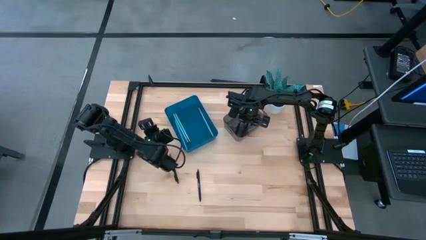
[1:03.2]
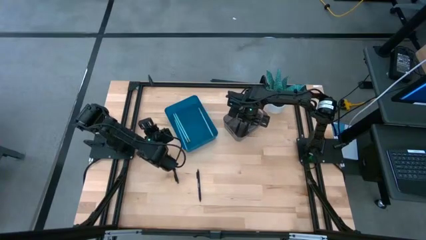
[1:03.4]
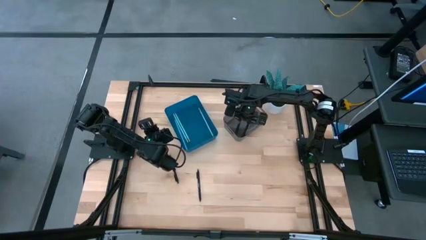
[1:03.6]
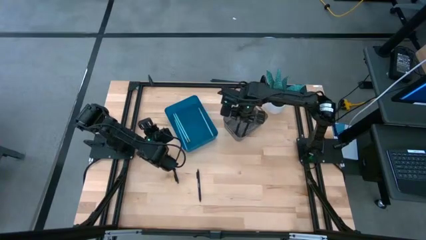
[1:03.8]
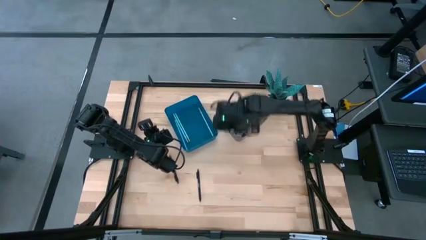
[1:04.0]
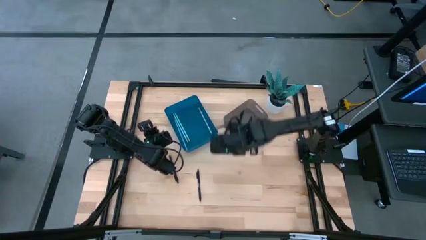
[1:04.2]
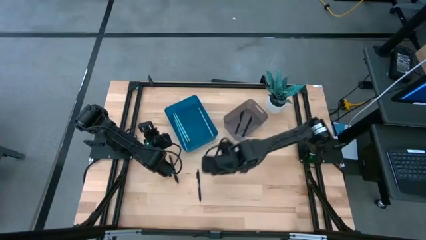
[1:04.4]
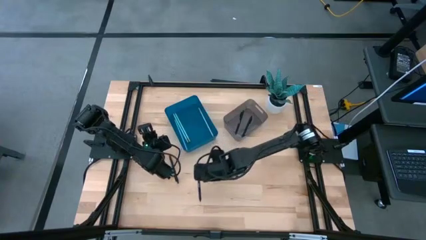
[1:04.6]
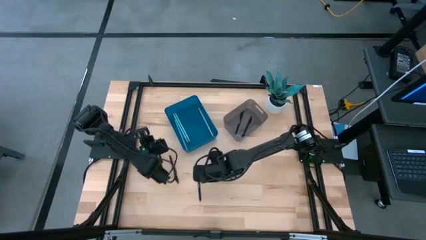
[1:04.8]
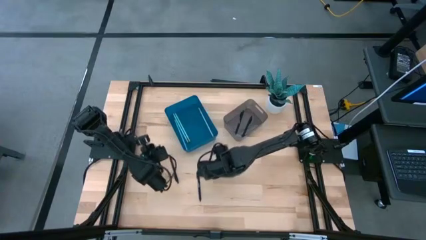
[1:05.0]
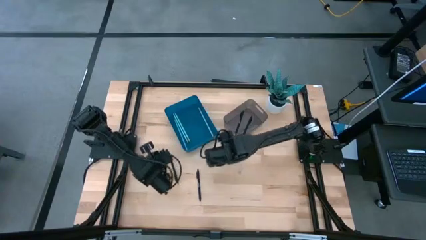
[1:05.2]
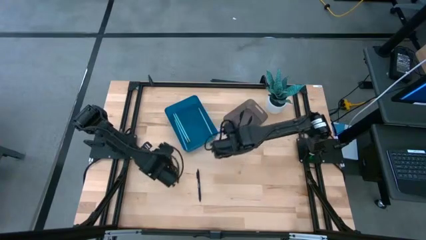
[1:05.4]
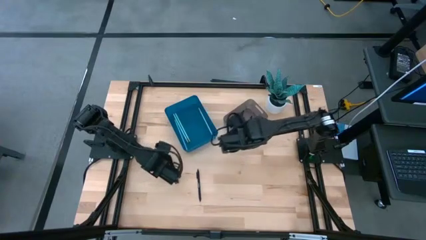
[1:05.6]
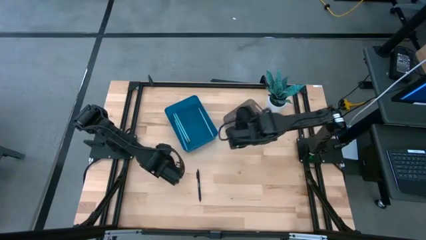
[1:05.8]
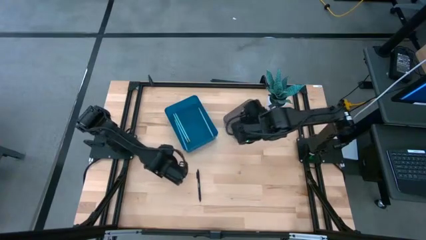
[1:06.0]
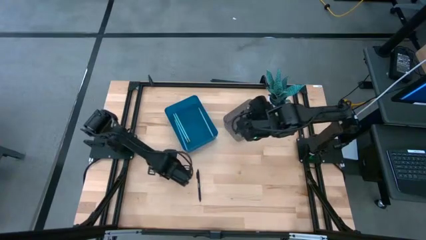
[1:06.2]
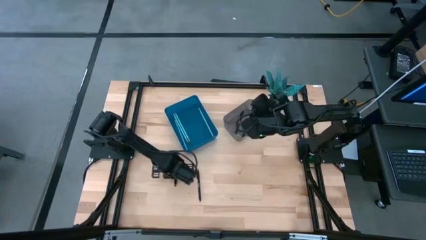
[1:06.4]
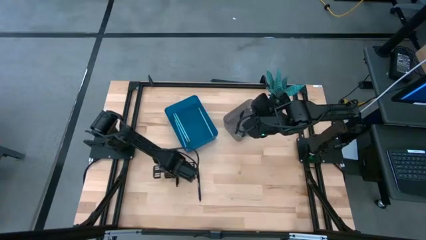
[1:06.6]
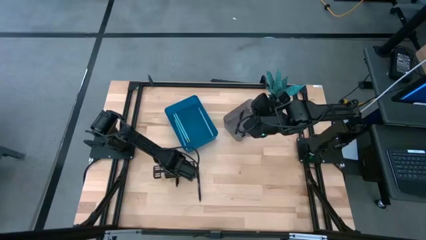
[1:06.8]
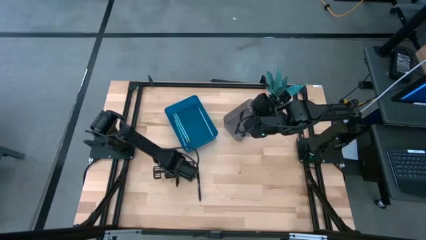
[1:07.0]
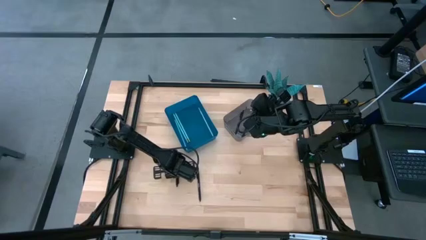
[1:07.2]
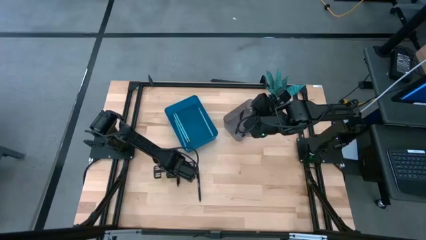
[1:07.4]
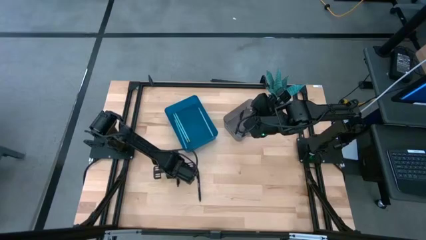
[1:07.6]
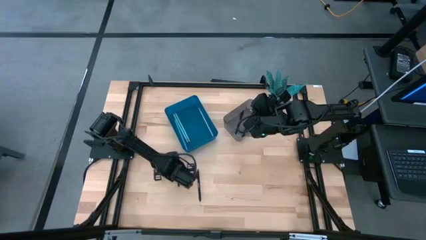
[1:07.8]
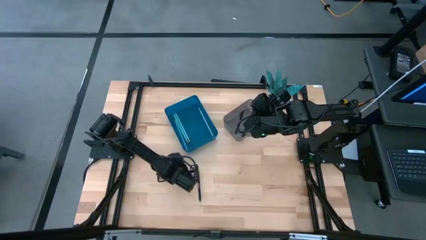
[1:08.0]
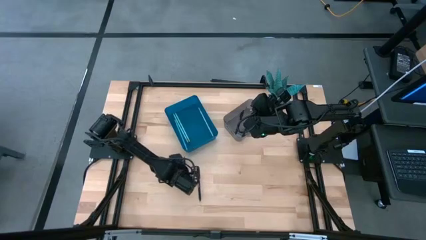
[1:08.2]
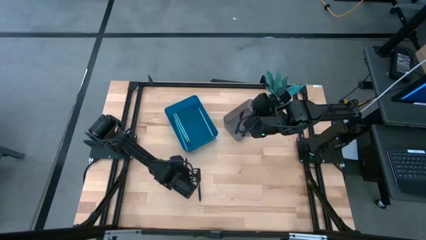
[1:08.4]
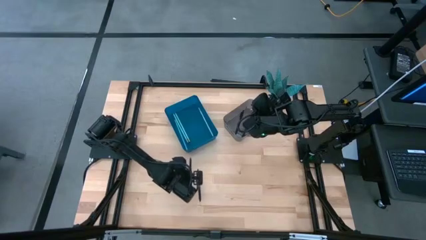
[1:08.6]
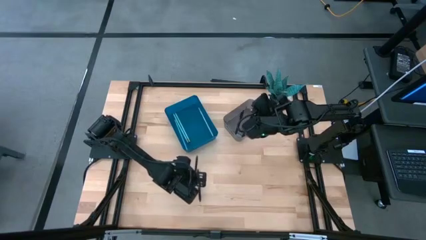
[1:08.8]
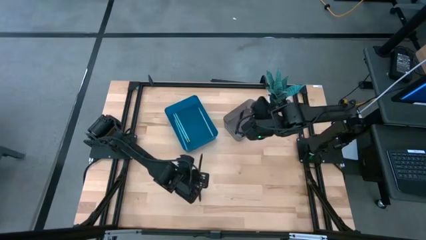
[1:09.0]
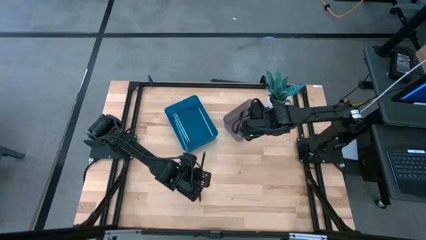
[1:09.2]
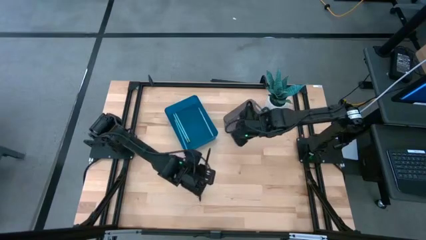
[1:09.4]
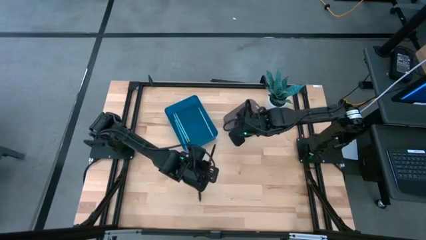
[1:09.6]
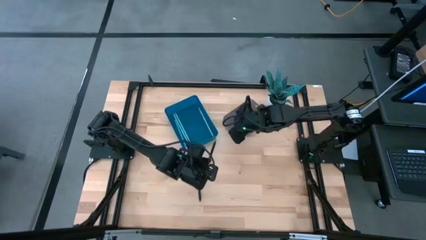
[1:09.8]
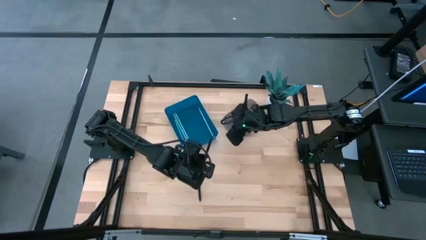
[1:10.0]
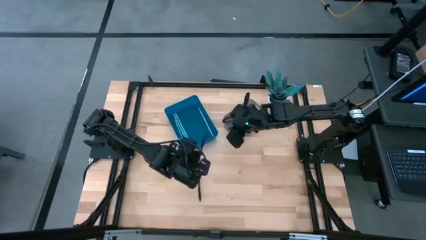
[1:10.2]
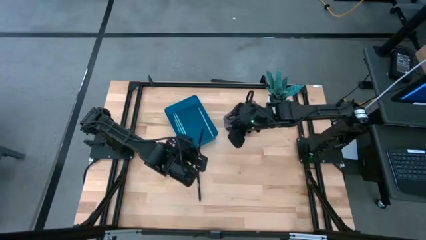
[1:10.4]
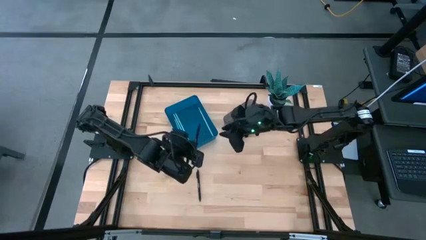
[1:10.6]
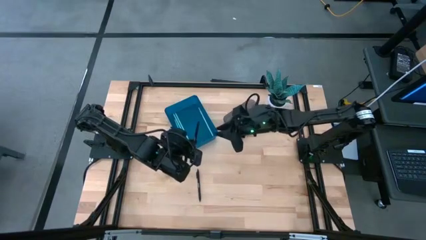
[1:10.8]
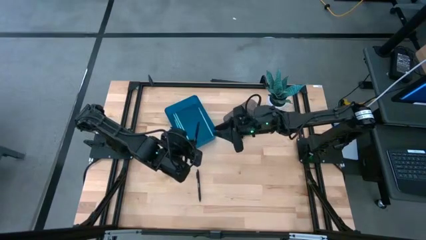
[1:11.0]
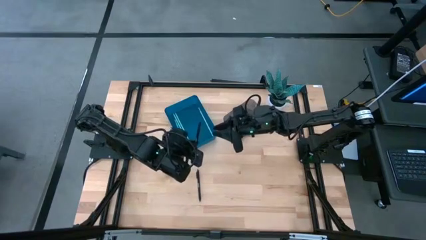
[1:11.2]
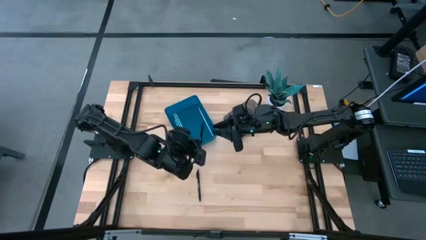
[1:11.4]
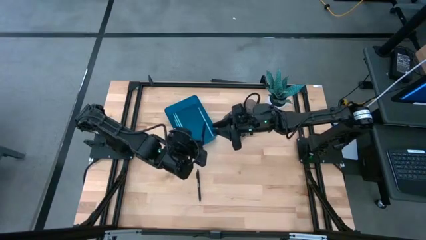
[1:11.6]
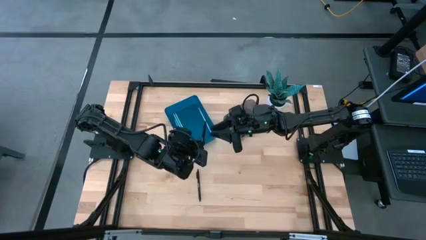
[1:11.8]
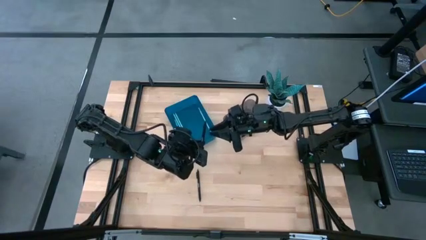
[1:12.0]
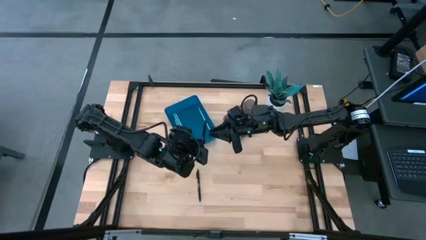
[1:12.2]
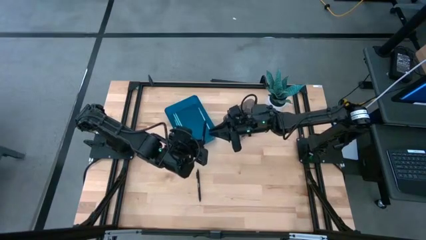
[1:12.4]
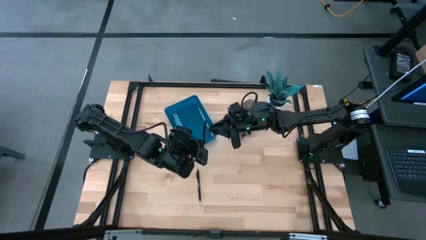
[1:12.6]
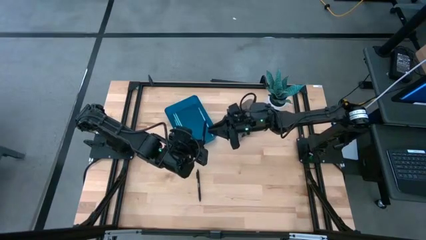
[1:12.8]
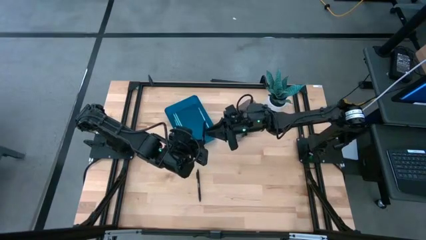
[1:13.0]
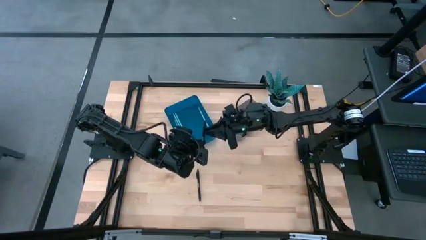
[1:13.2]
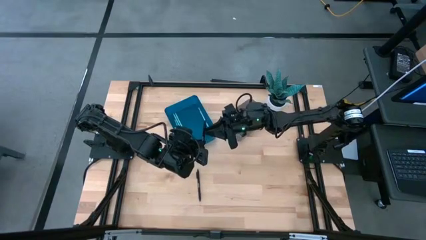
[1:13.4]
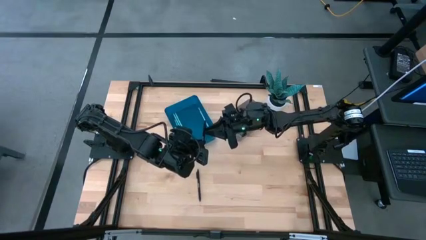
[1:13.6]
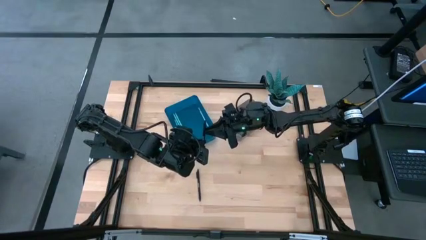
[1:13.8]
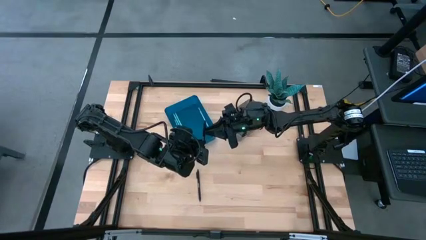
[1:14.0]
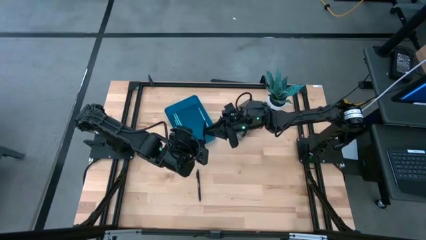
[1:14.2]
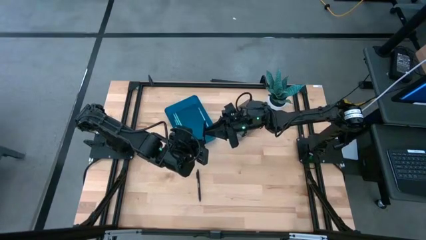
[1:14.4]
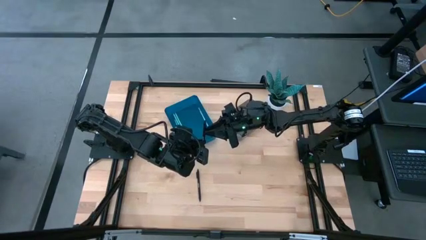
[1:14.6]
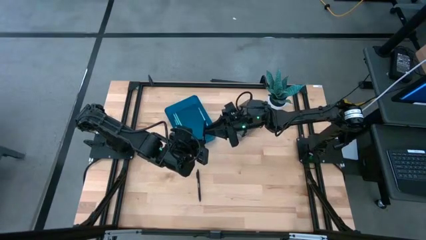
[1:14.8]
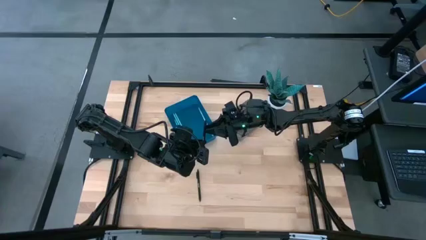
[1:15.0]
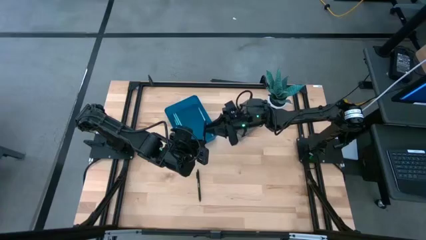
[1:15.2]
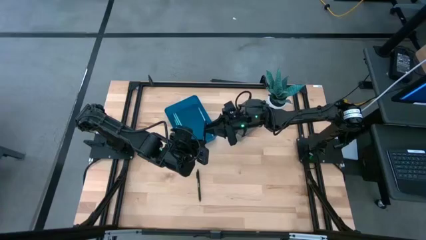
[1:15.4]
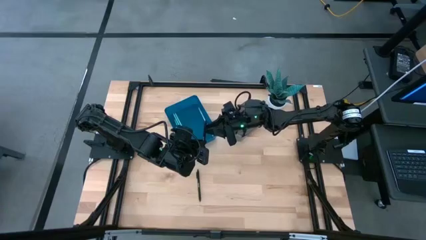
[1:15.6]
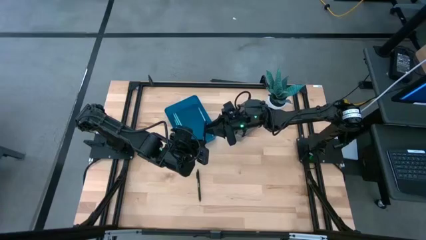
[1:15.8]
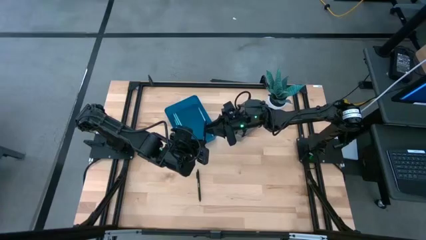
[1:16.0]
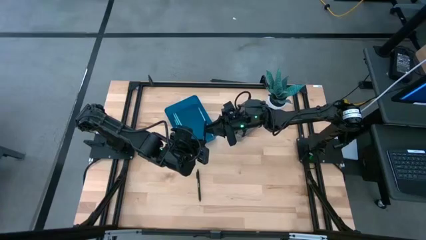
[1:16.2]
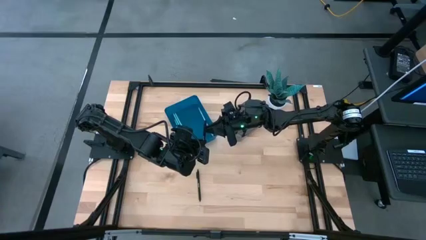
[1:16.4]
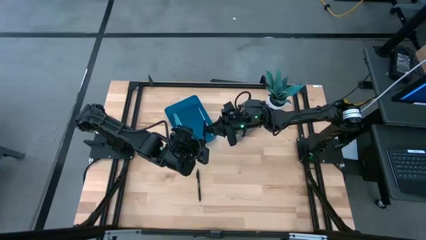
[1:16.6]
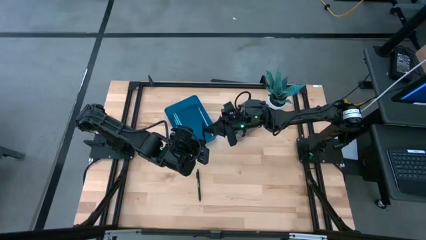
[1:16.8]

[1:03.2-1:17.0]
Task: Sort pens & pencils
Put the left black pen into the gray bin

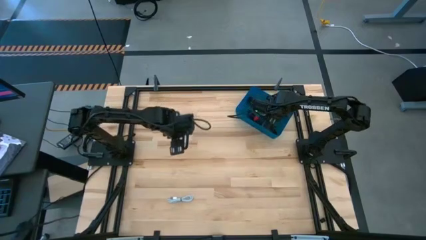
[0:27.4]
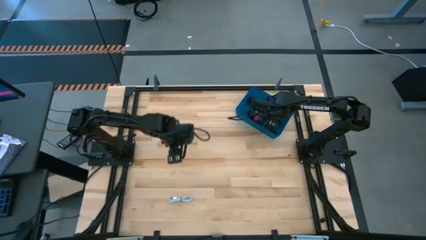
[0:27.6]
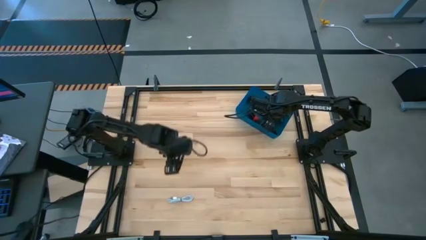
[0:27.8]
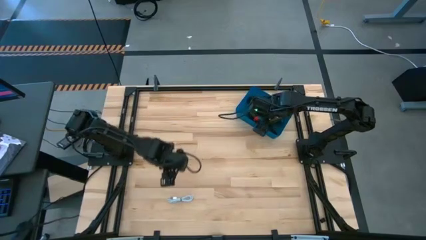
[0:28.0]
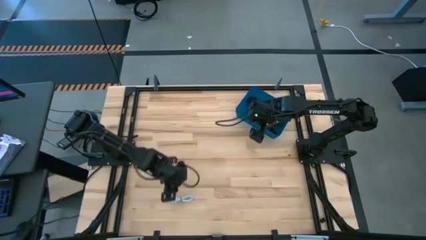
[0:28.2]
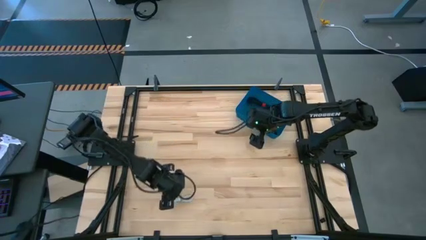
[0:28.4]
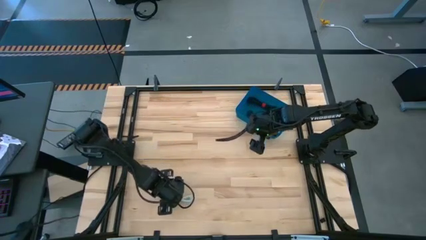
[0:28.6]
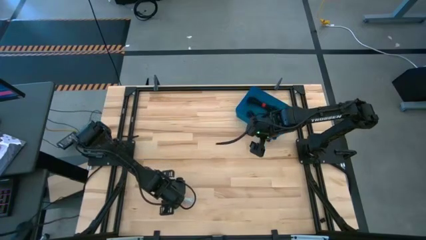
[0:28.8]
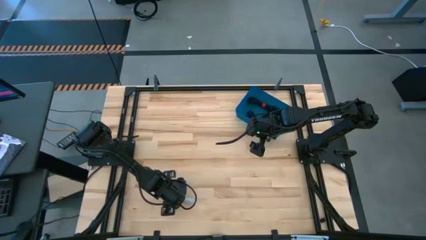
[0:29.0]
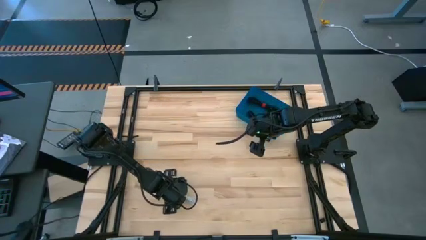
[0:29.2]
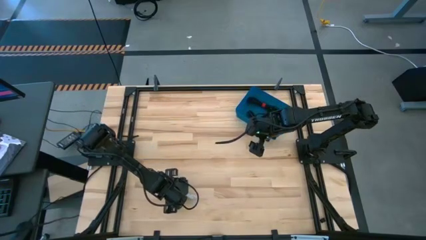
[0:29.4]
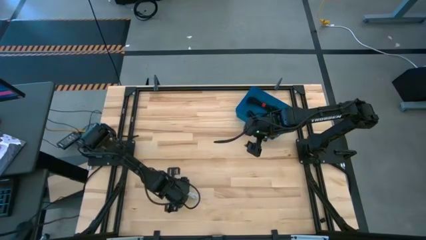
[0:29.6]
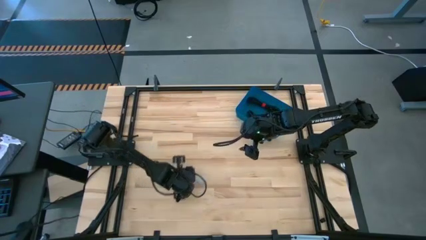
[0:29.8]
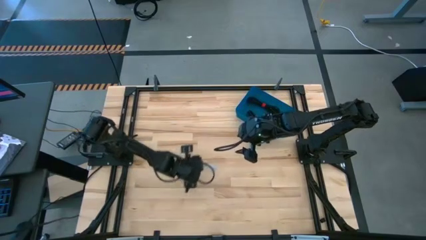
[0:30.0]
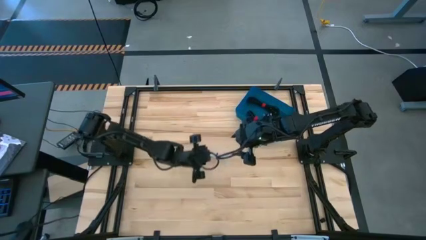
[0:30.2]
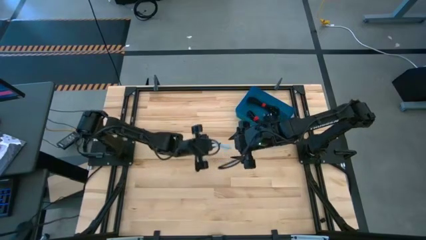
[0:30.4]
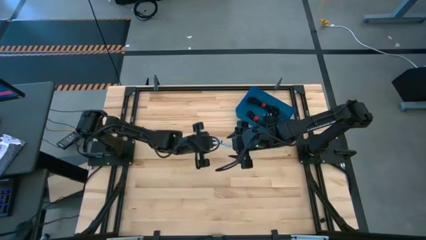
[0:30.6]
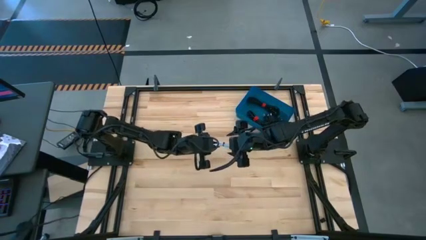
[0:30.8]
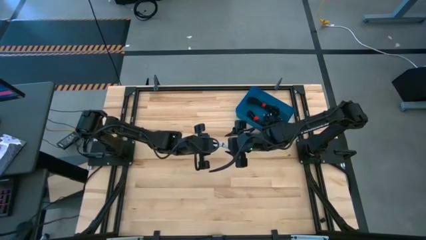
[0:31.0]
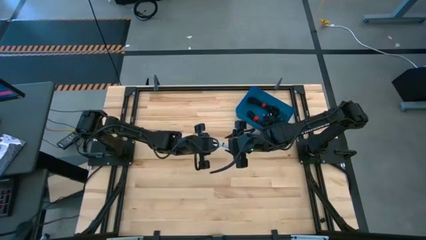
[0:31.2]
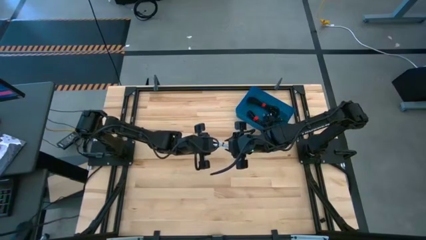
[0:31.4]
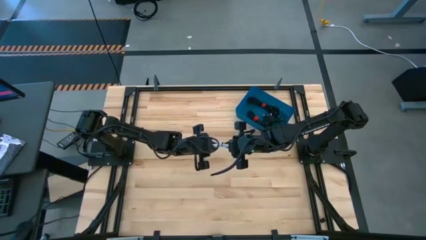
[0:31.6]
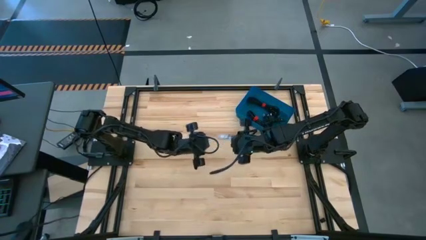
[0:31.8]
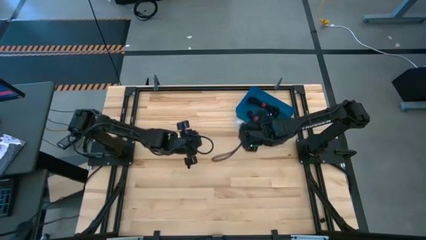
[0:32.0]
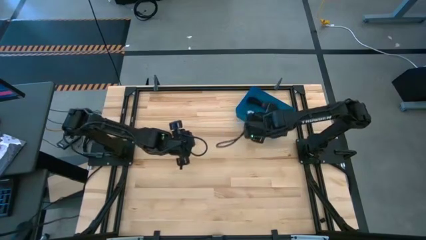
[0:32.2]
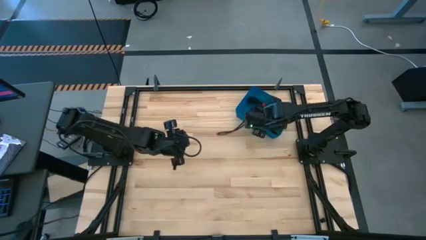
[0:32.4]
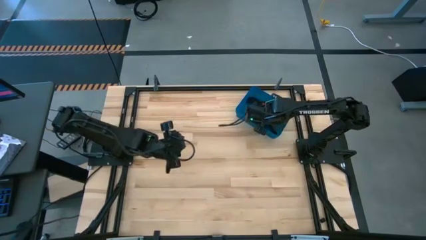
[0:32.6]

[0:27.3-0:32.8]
Task: Pick and place USB-C Cables
Put the white charger cable into the bin
